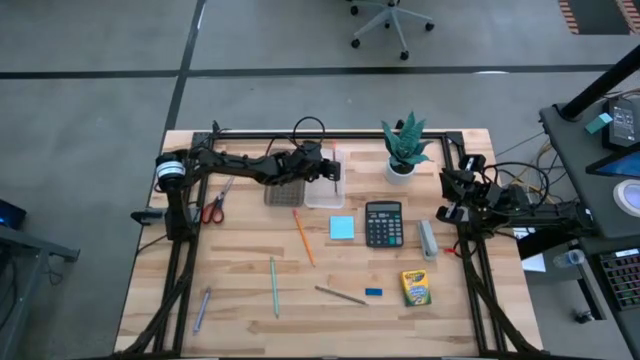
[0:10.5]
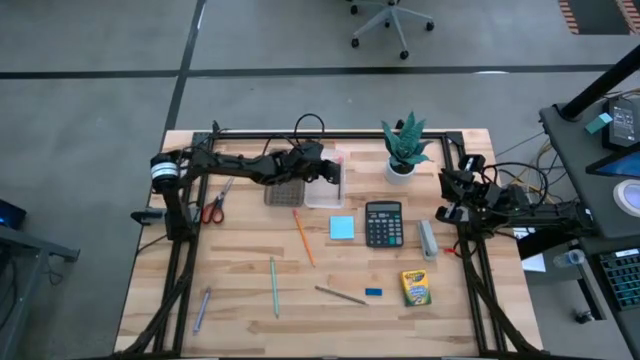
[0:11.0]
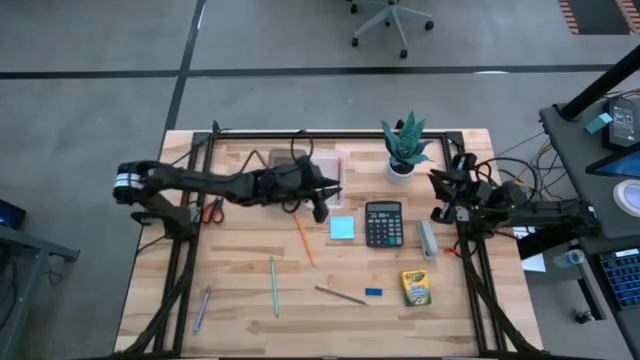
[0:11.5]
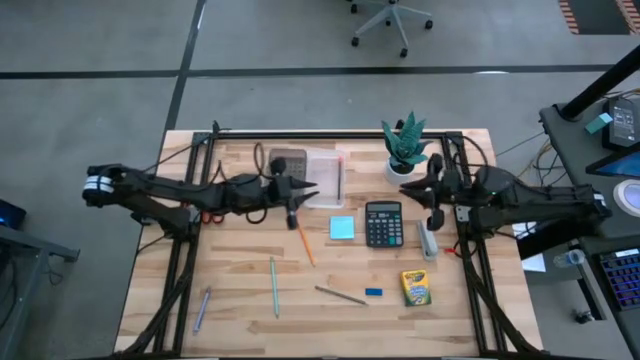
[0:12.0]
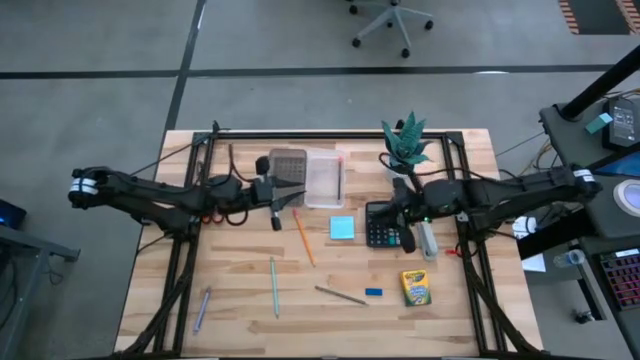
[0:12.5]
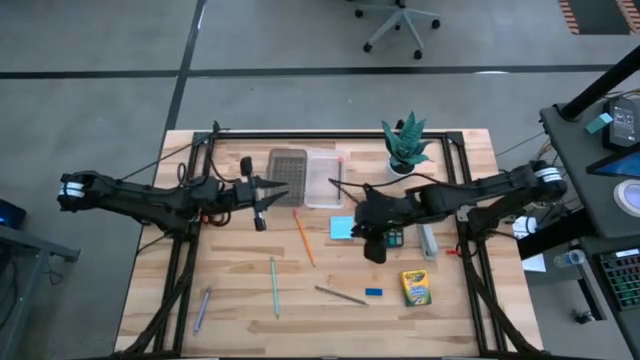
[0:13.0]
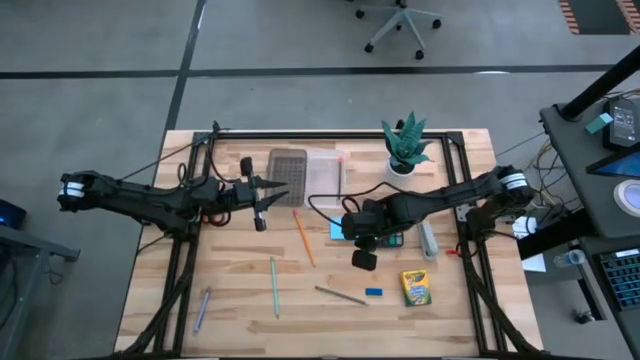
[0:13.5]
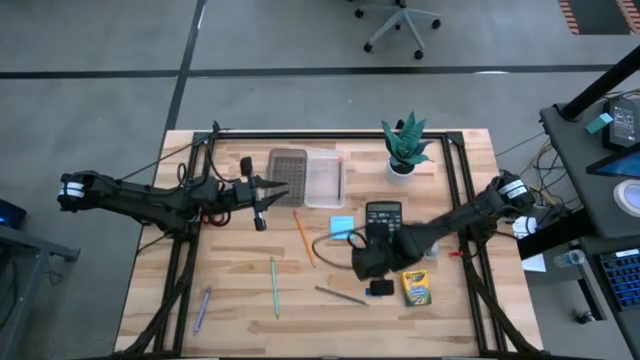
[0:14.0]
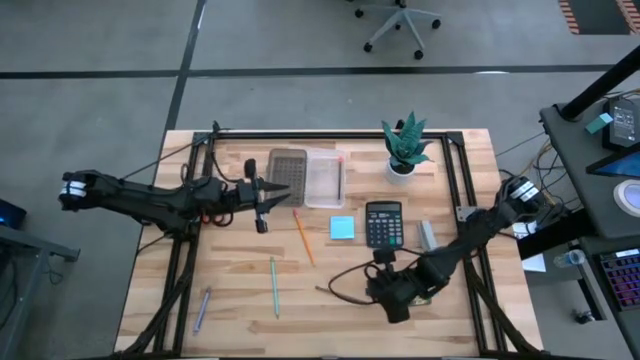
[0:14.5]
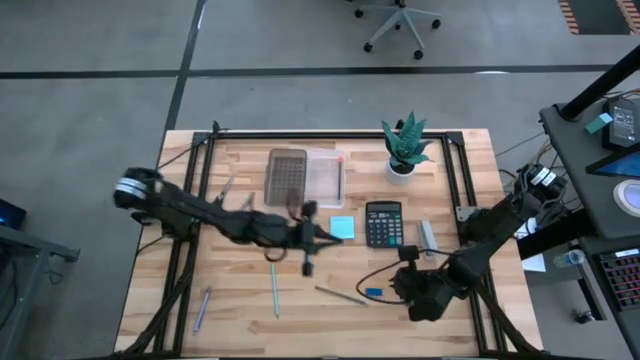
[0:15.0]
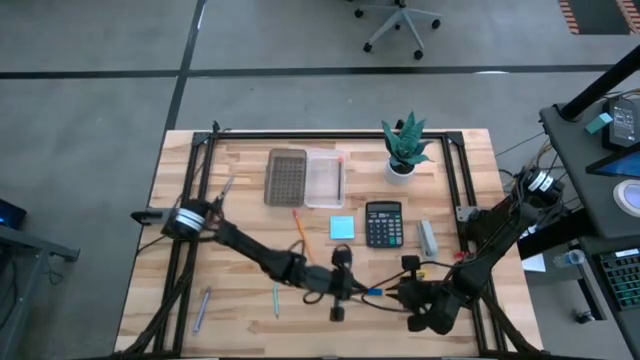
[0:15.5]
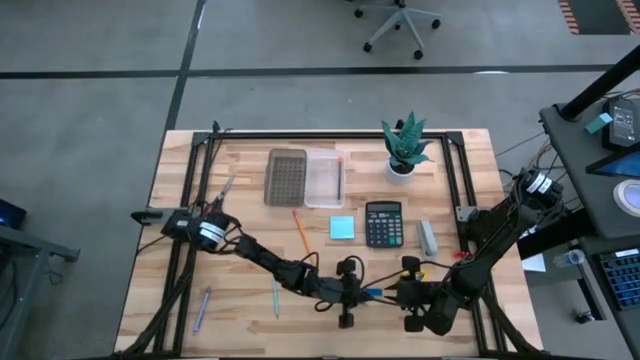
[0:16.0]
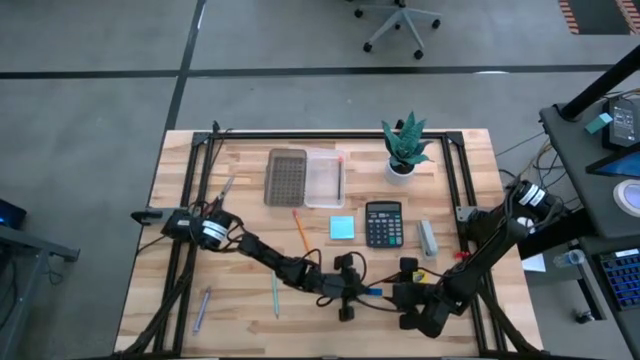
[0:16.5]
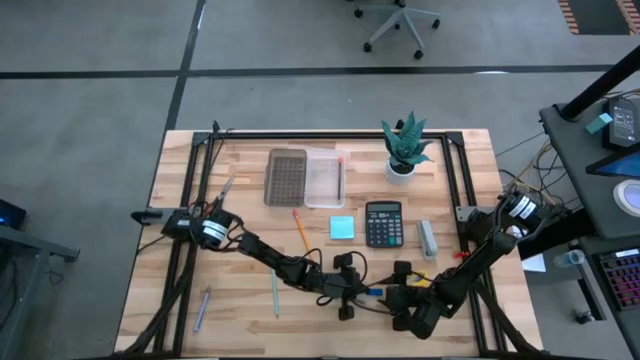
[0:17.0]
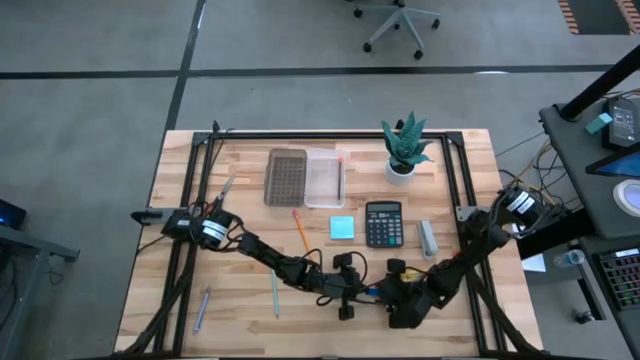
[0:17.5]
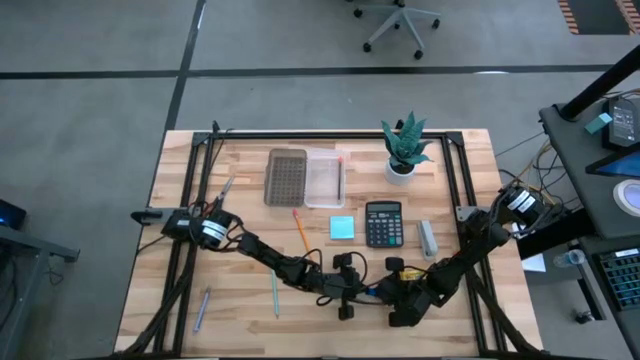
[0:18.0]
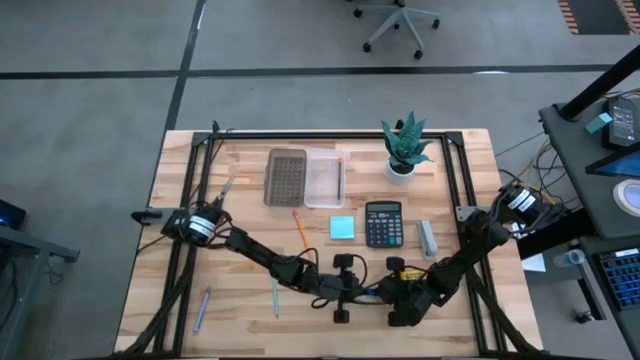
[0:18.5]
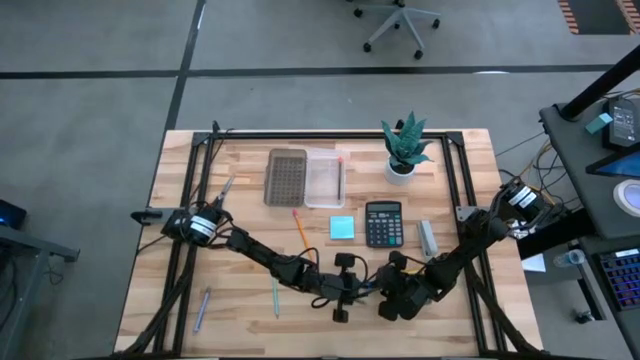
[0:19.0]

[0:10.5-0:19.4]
Task: Pack school essentials
Put the blue eraser into the transparent supply box

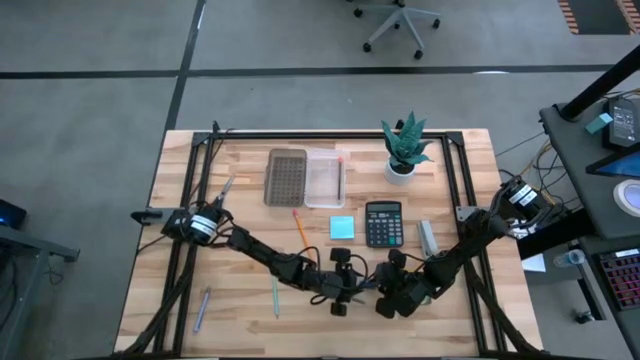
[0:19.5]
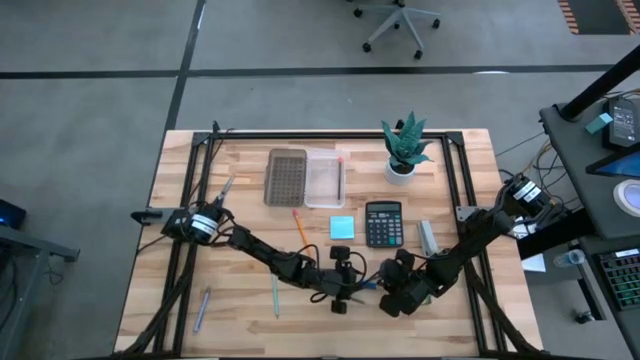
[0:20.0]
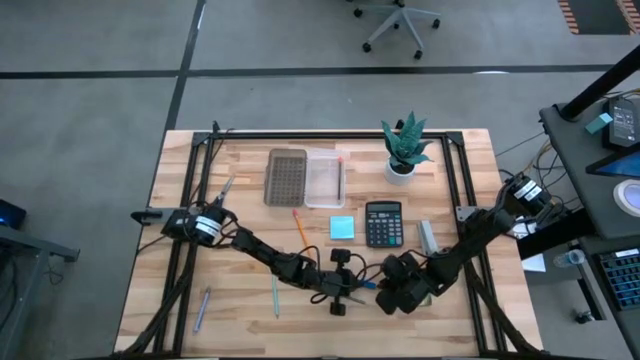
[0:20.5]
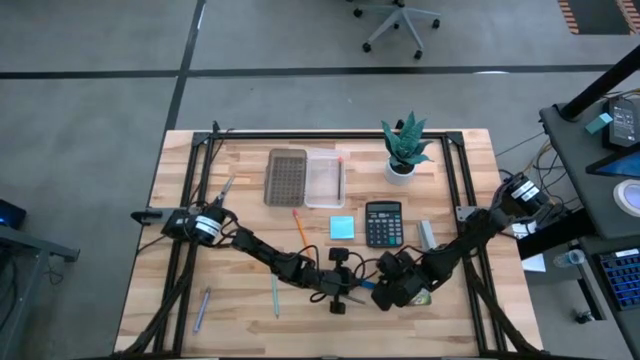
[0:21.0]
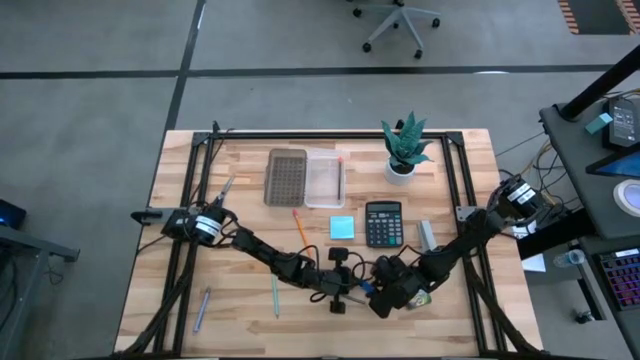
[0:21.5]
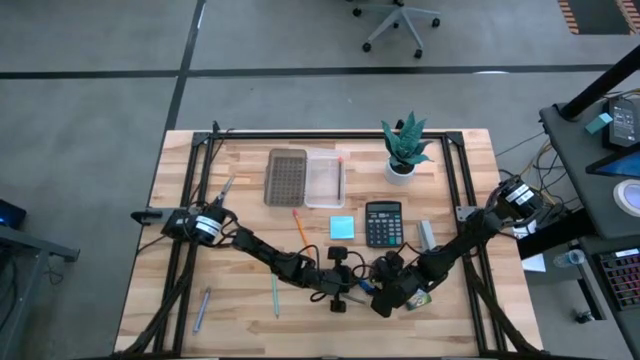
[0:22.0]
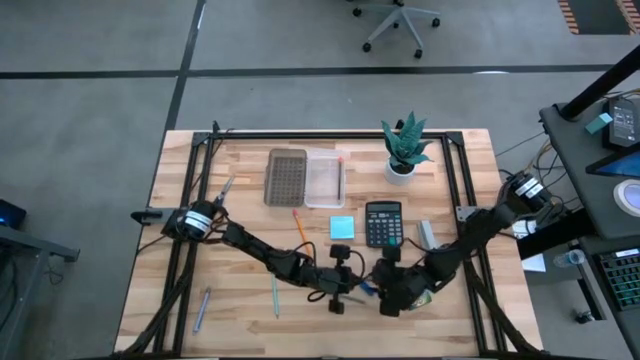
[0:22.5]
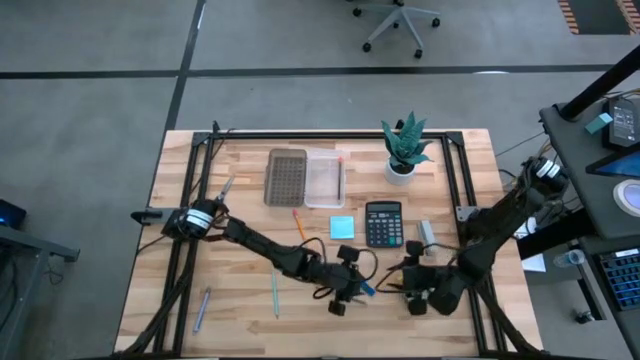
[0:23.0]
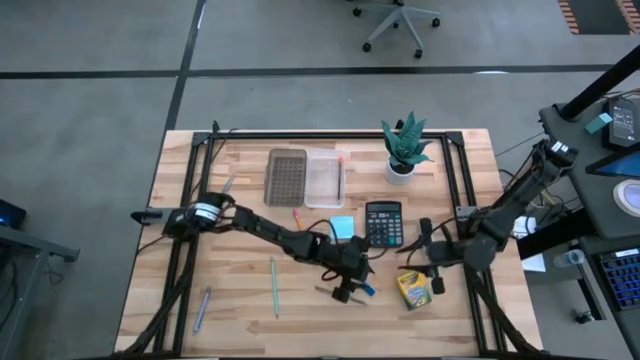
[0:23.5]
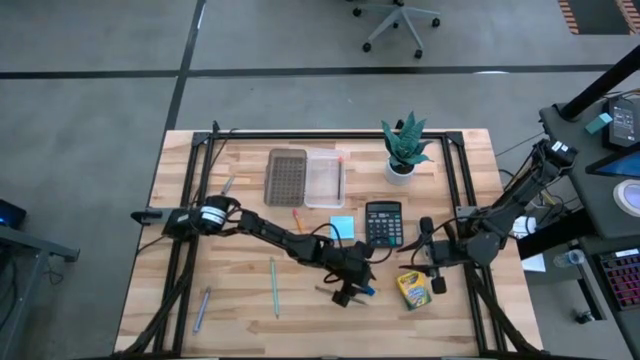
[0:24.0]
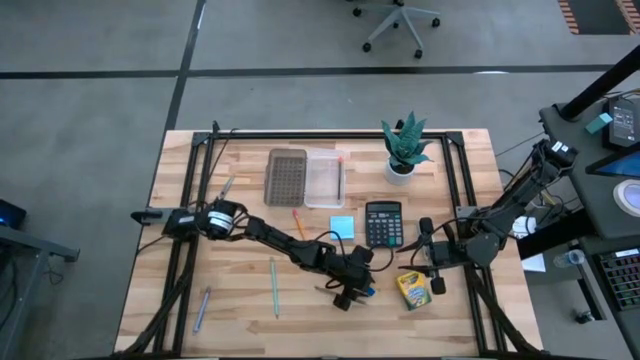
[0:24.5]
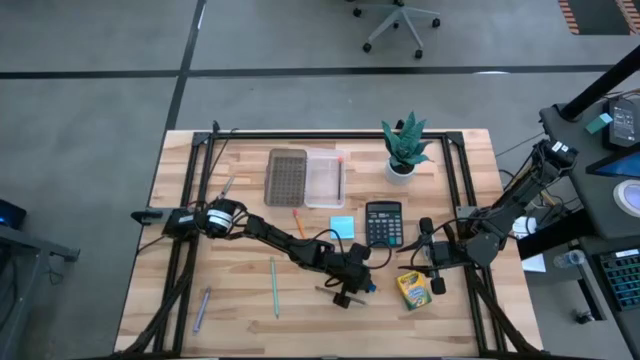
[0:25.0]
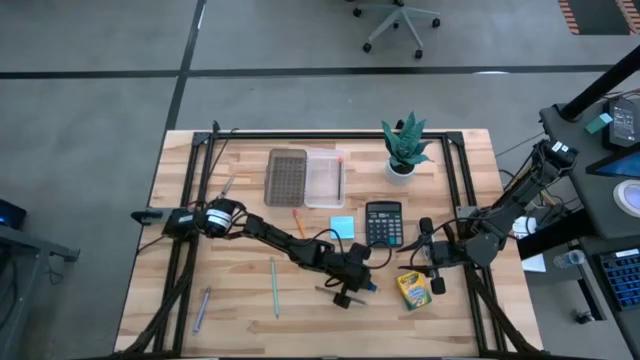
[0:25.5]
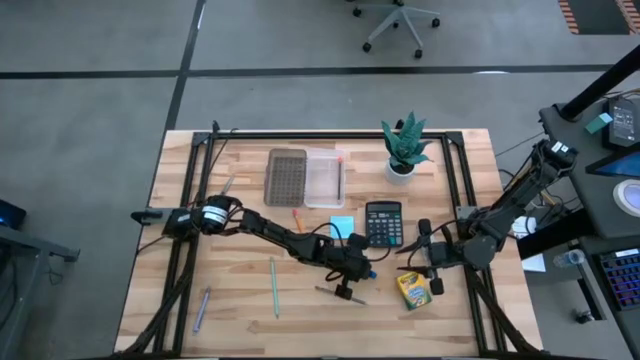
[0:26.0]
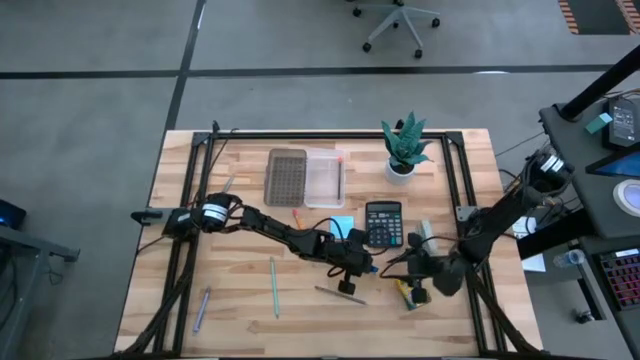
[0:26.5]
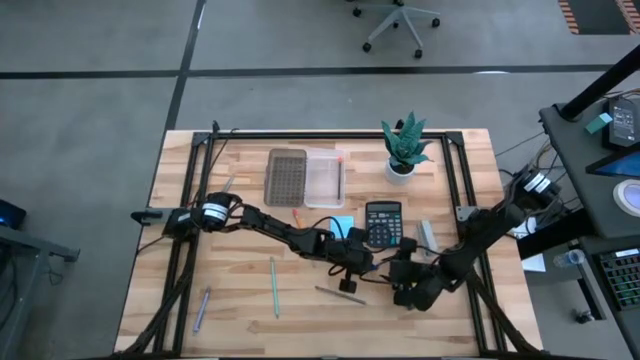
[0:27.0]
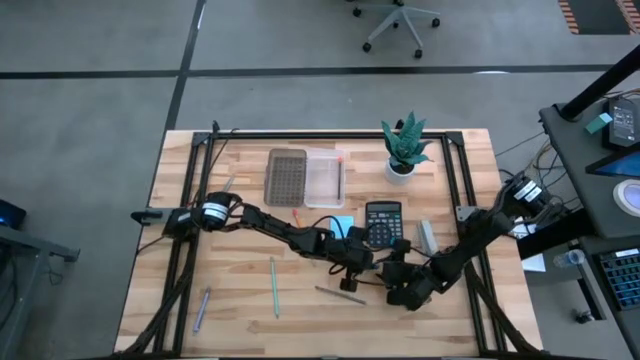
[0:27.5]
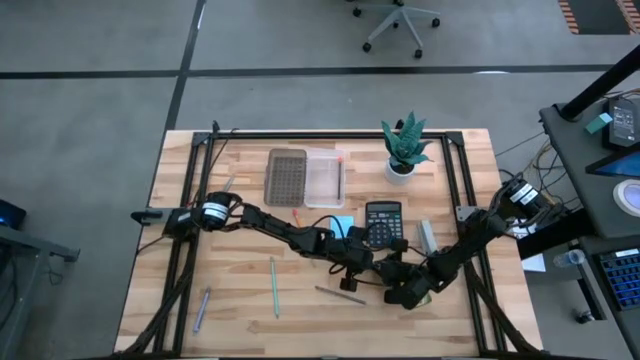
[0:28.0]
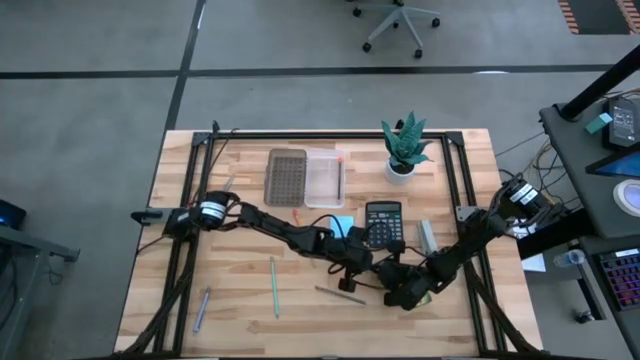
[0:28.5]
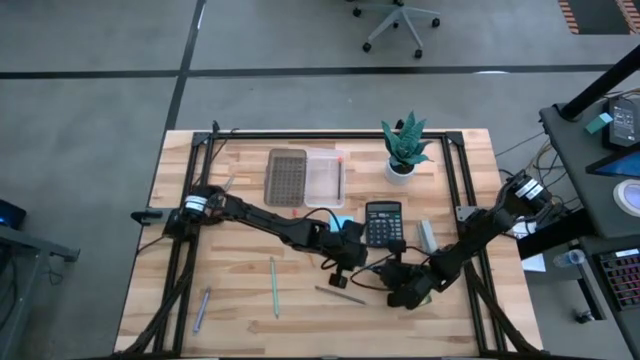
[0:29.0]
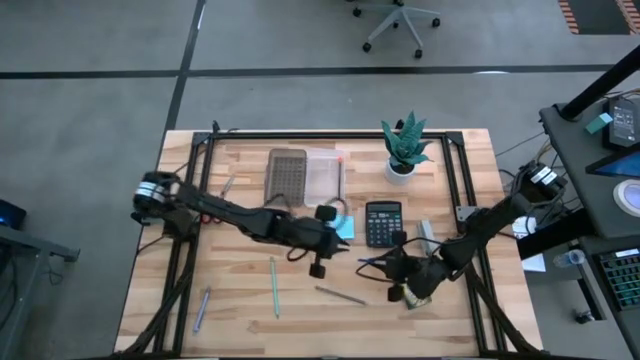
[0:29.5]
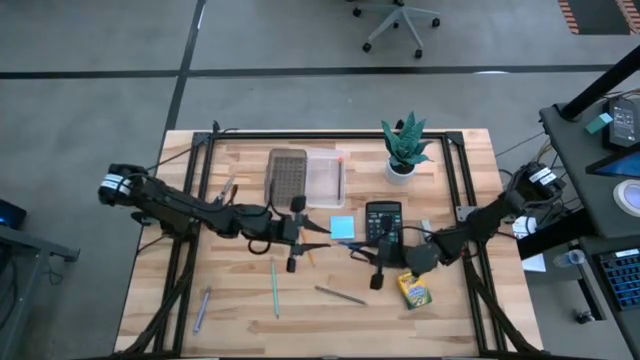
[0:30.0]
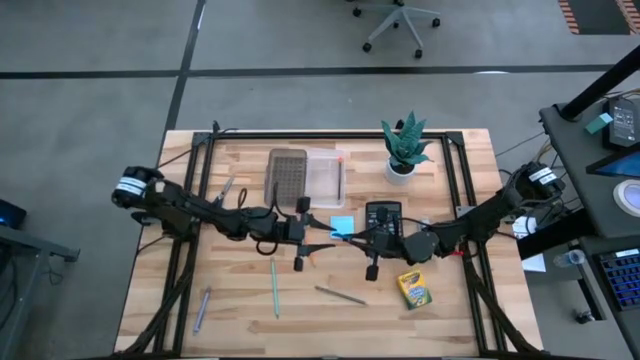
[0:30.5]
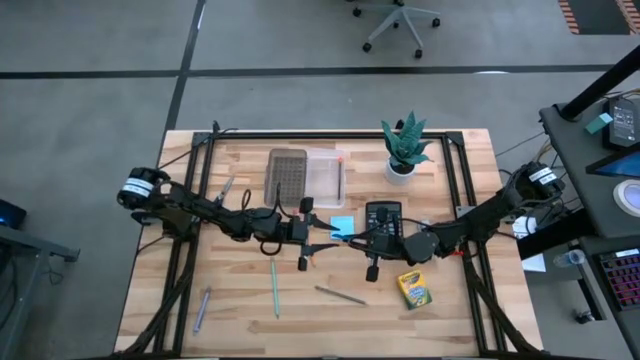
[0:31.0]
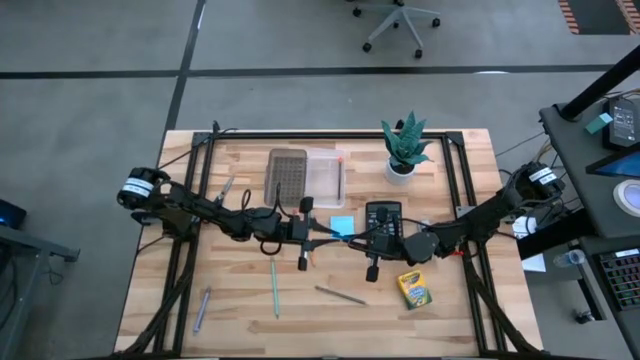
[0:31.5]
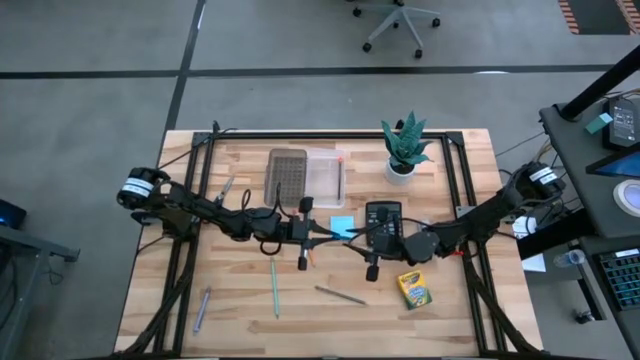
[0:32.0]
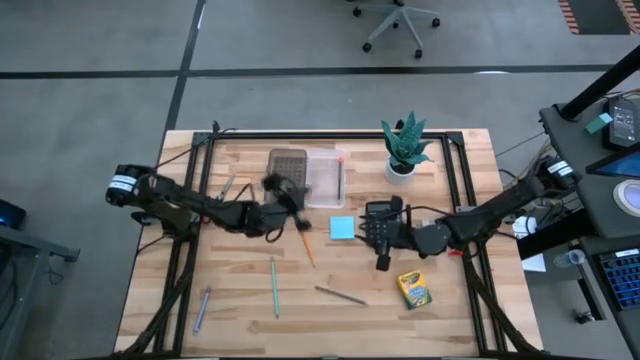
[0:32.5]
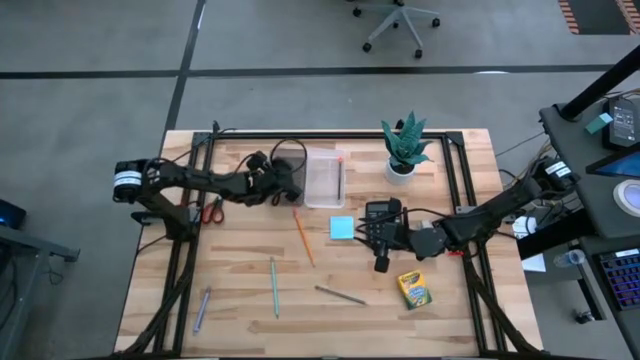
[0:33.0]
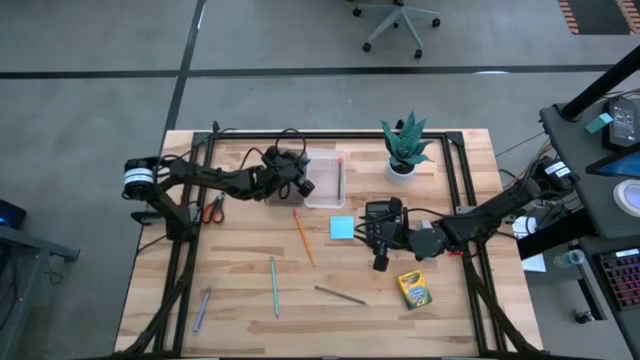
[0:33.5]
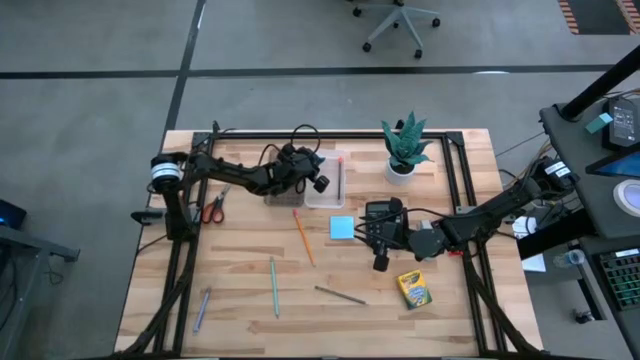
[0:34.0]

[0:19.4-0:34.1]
Put the blue eraser into the transparent supply box
